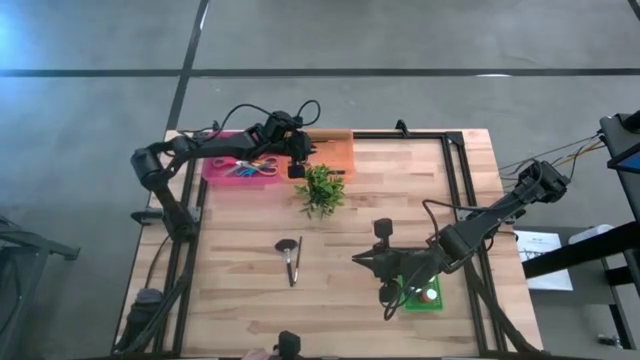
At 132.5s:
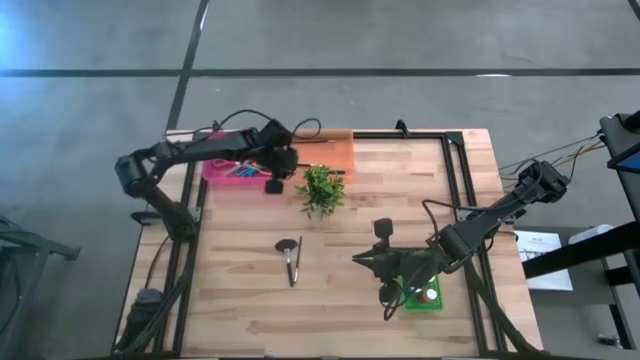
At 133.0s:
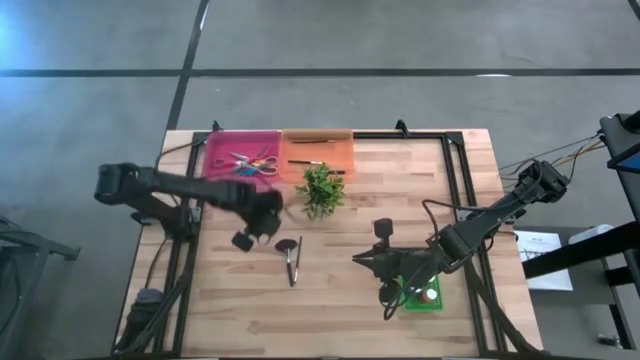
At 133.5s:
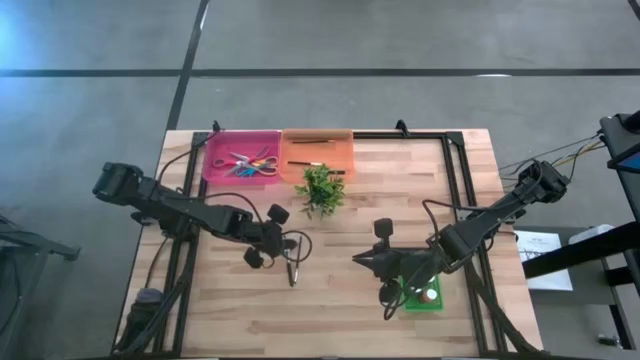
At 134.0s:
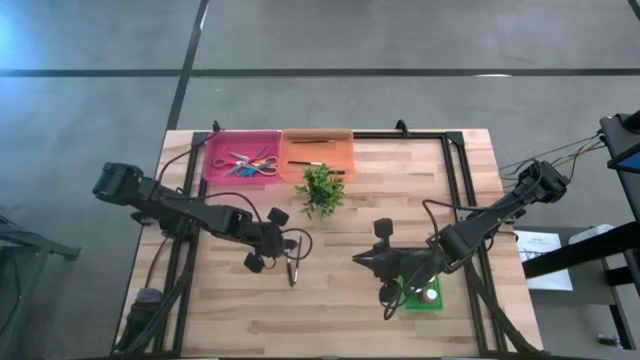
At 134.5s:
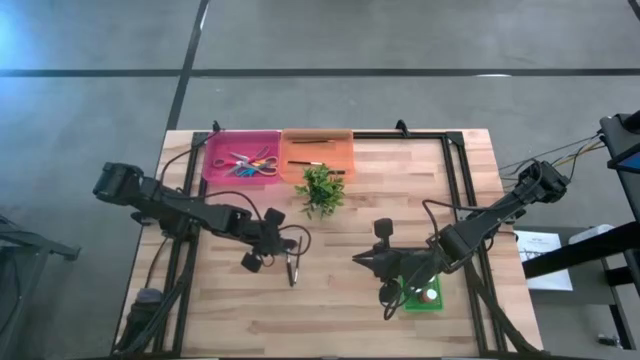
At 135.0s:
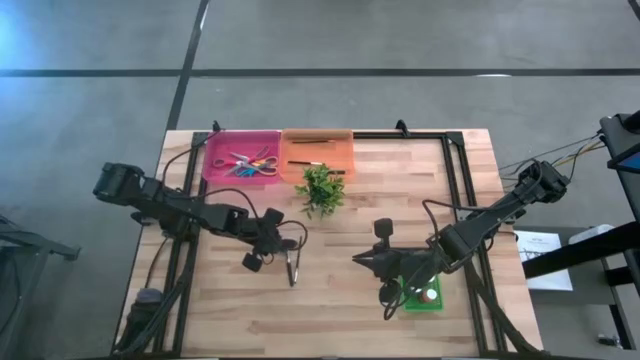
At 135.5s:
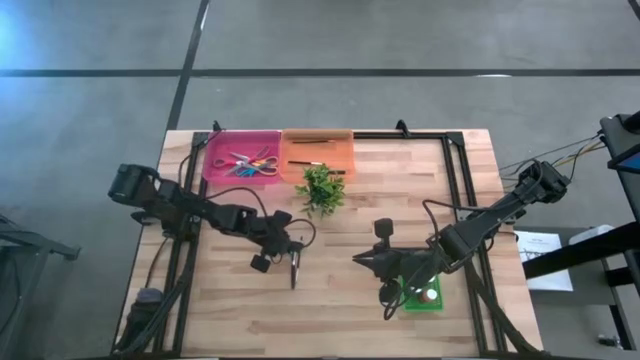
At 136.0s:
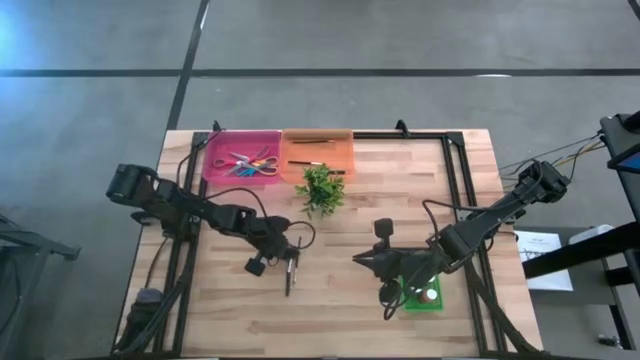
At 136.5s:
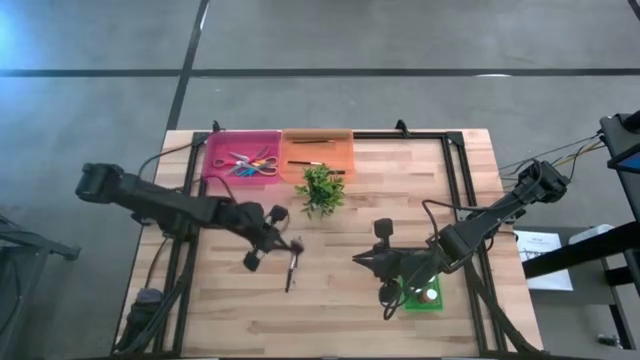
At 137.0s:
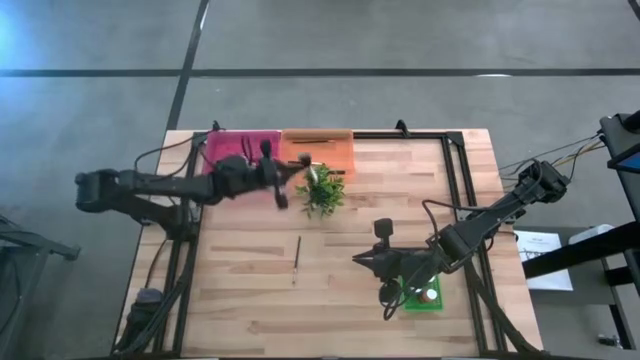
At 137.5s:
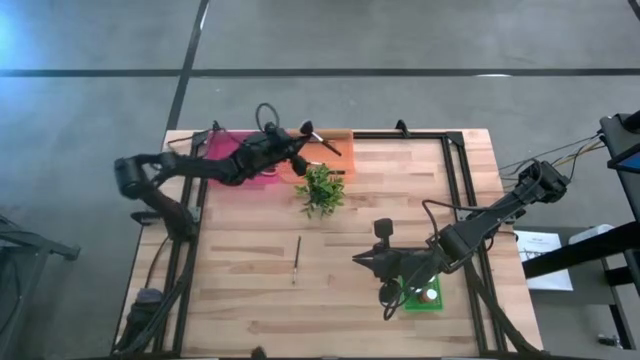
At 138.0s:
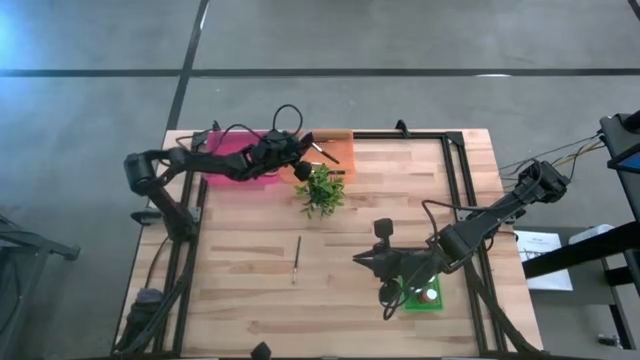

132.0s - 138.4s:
Task: Pick & Place Paint Supplies
Put the silver highlighter brush into the orange bin

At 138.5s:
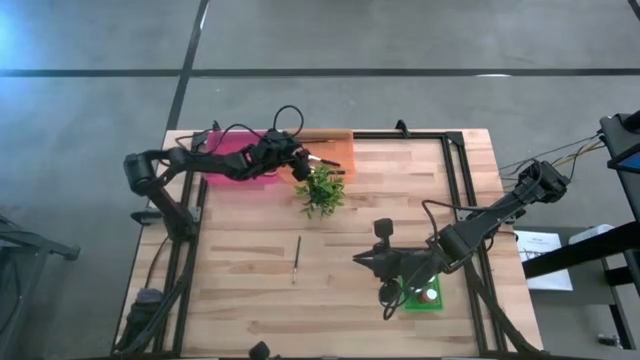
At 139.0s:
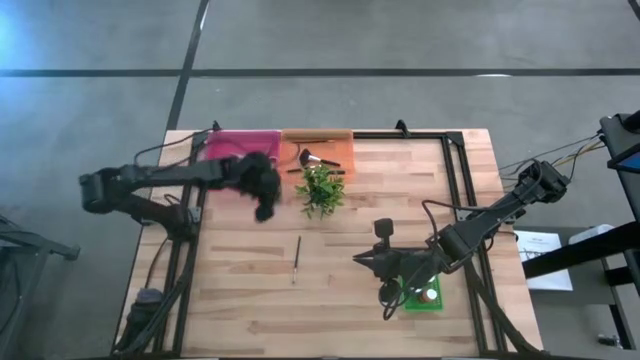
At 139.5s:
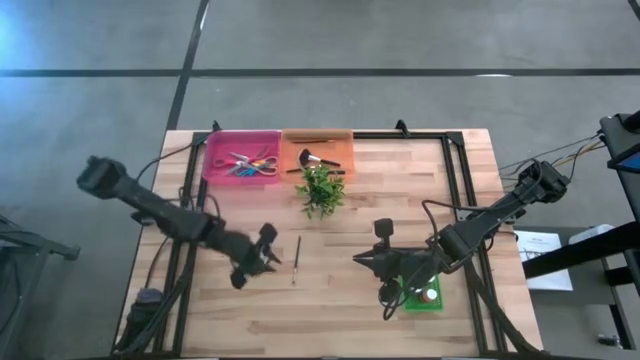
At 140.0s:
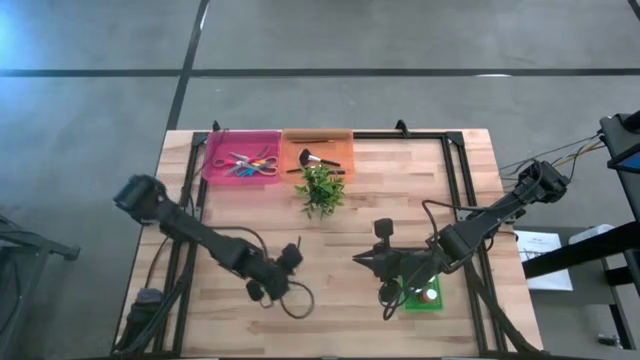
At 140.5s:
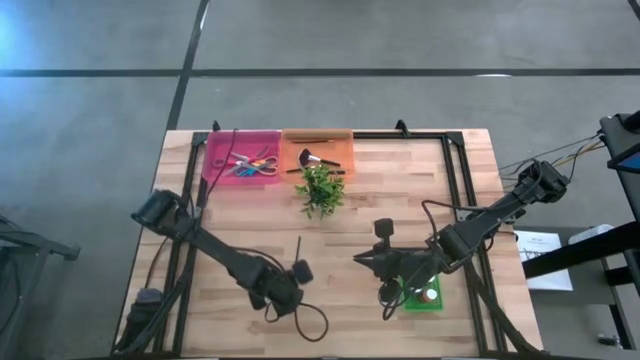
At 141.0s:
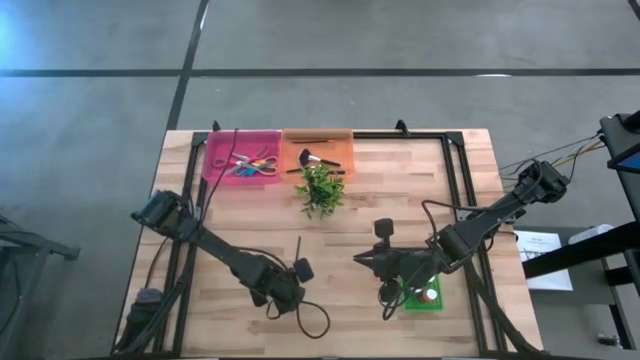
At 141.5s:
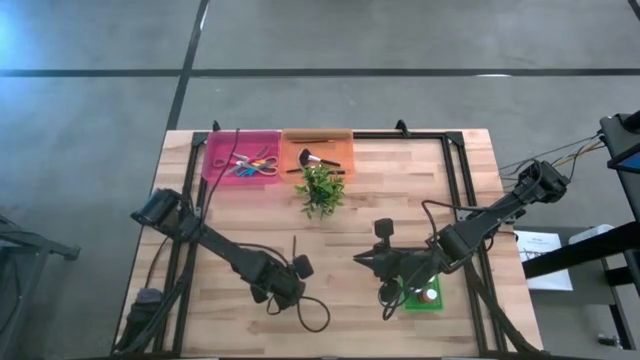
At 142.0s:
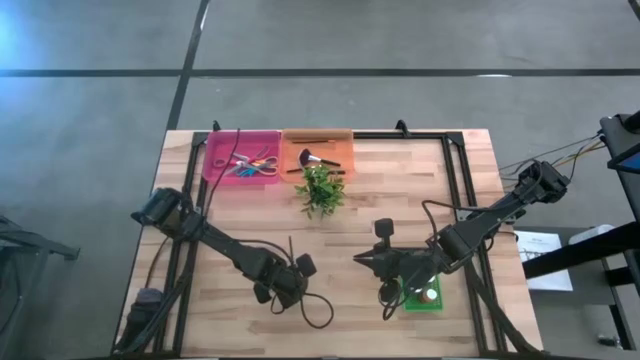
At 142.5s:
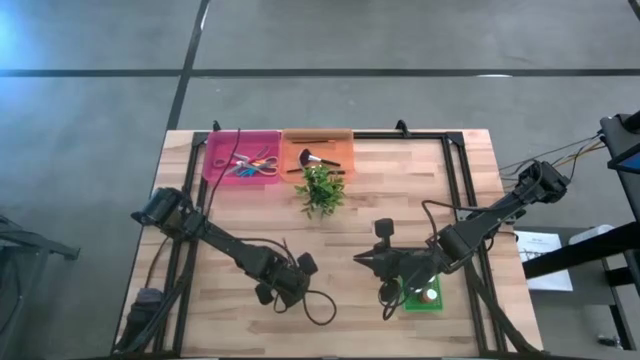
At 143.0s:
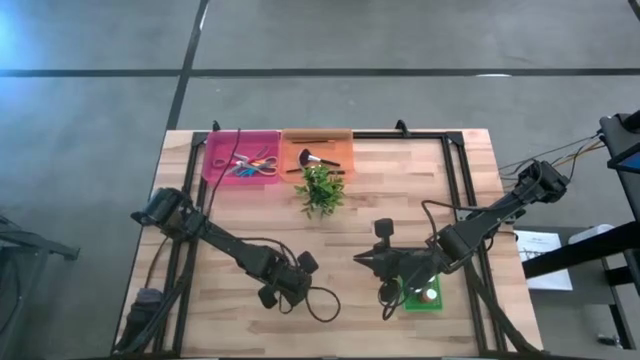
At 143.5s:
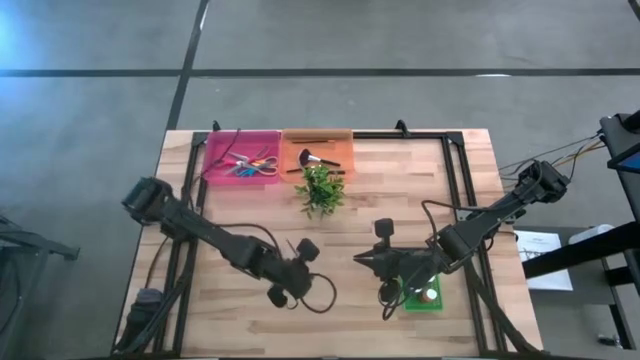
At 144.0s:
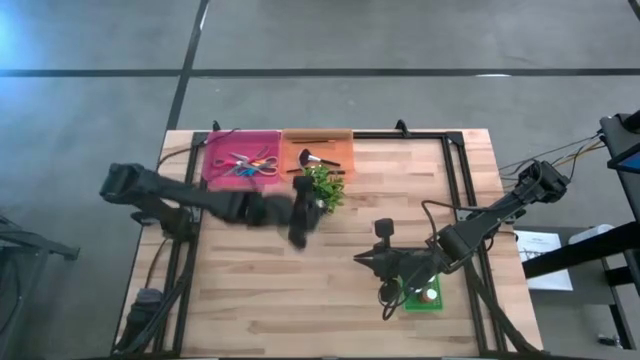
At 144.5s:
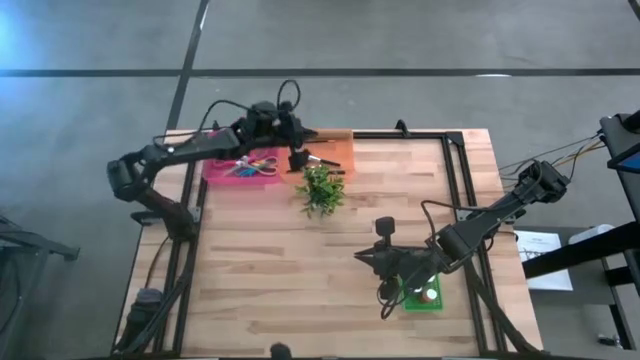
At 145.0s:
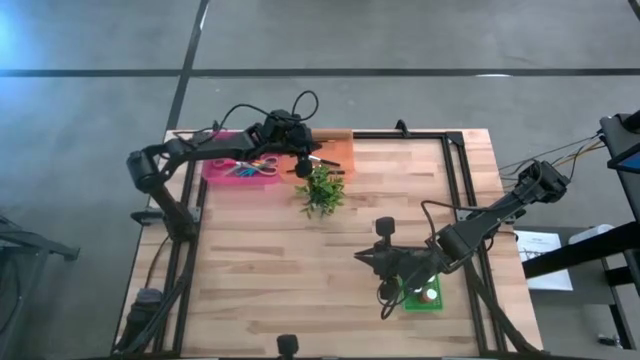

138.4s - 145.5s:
Put the silver eyeshadow brush into the orange bin

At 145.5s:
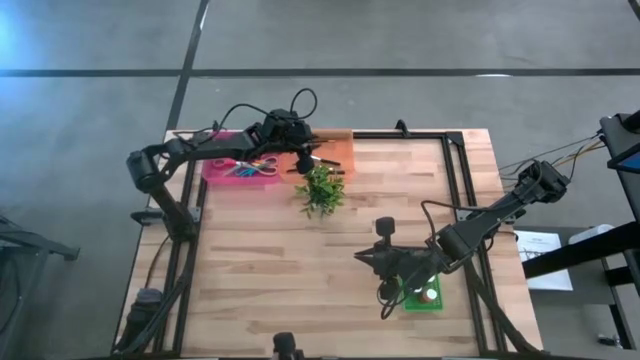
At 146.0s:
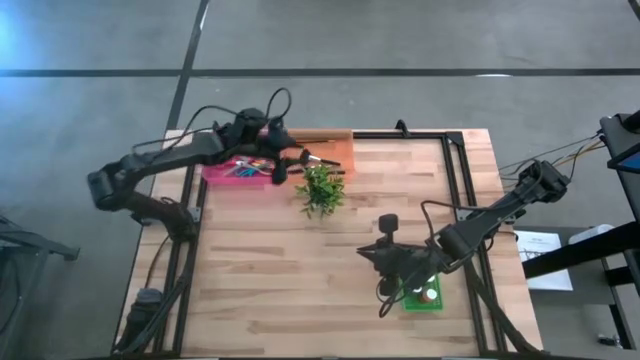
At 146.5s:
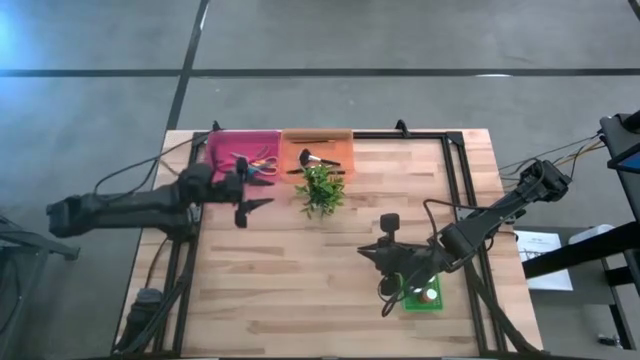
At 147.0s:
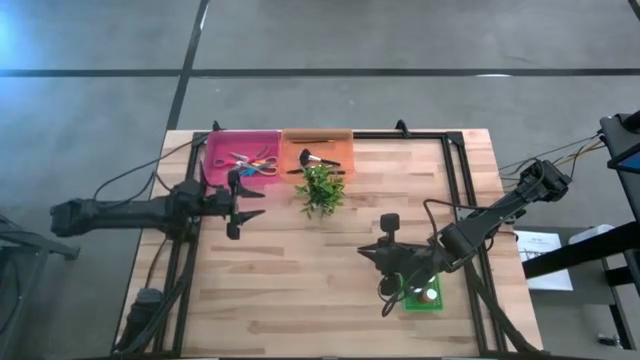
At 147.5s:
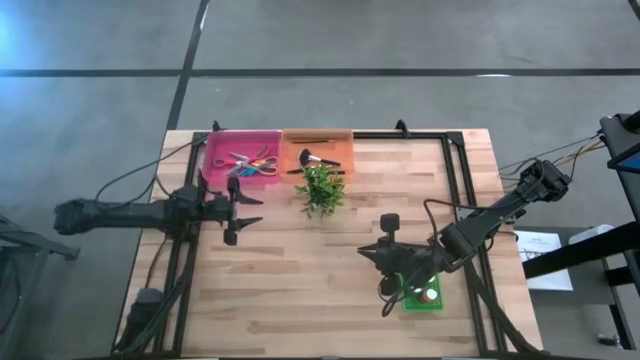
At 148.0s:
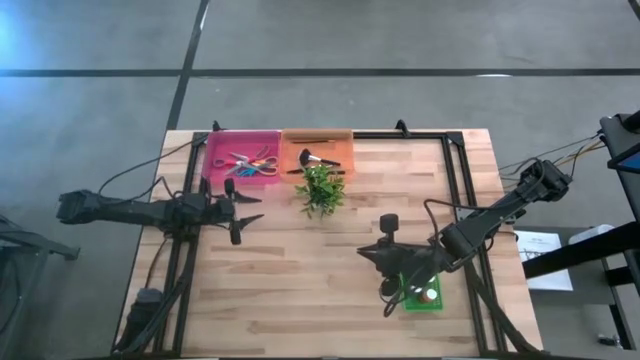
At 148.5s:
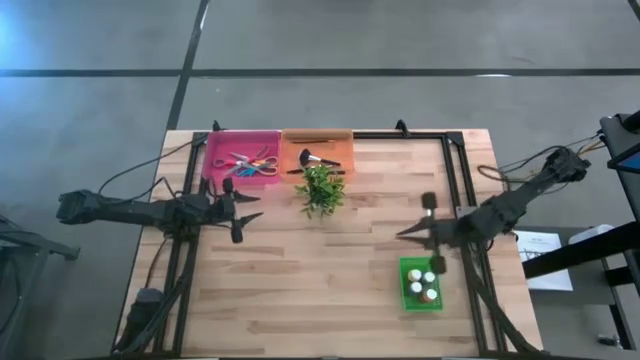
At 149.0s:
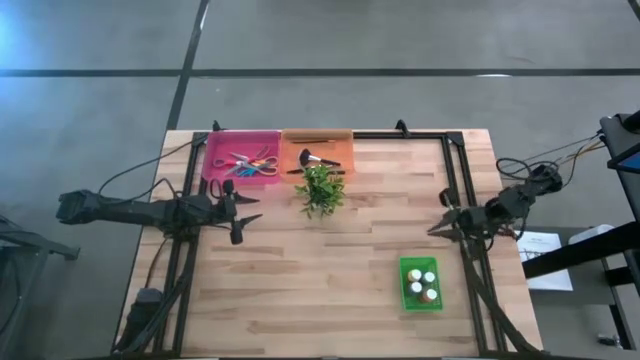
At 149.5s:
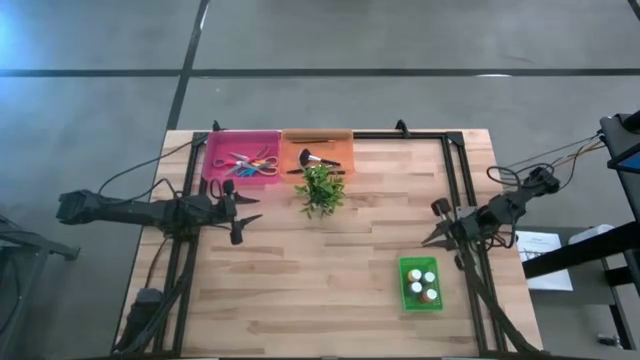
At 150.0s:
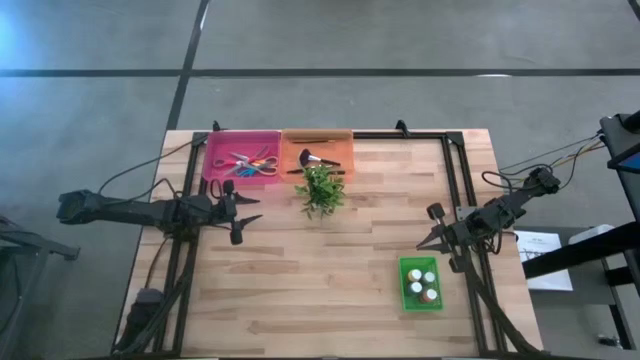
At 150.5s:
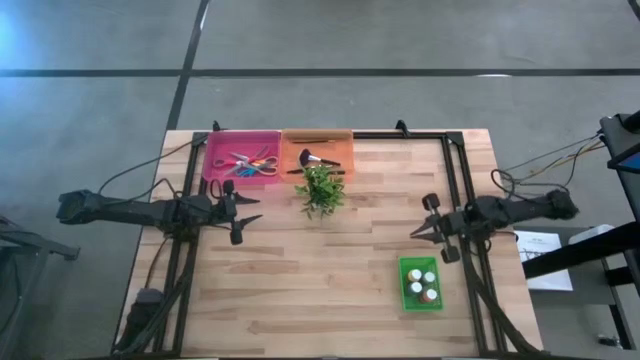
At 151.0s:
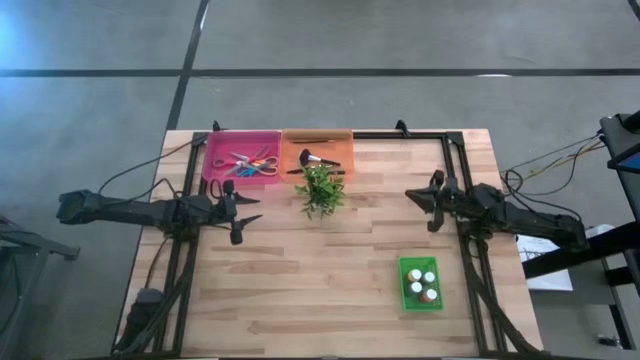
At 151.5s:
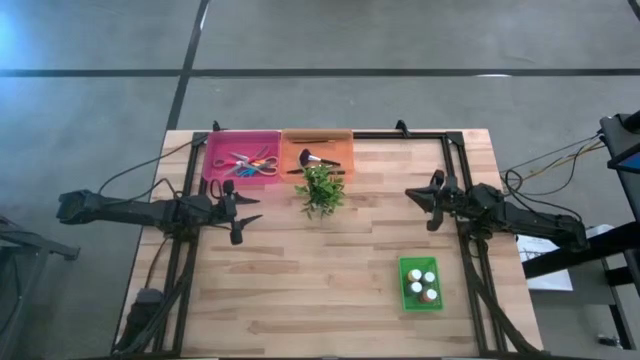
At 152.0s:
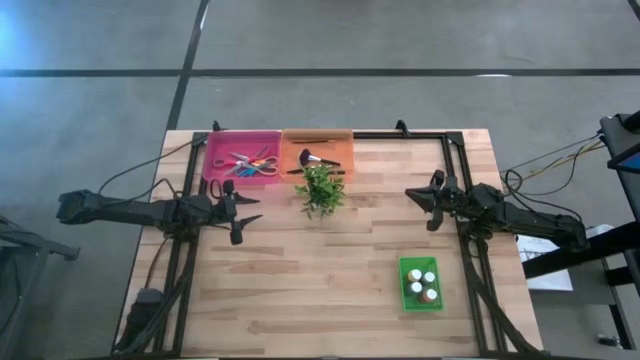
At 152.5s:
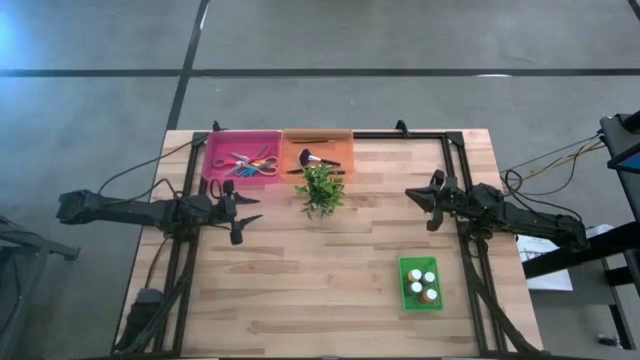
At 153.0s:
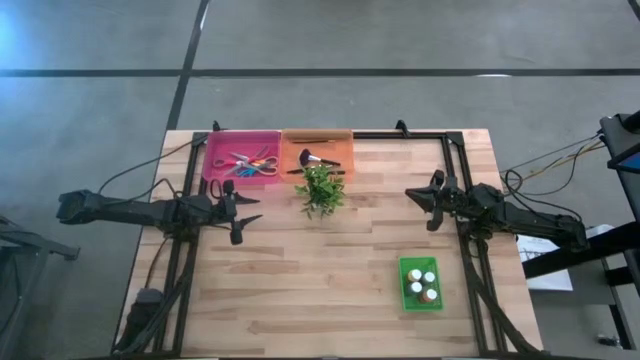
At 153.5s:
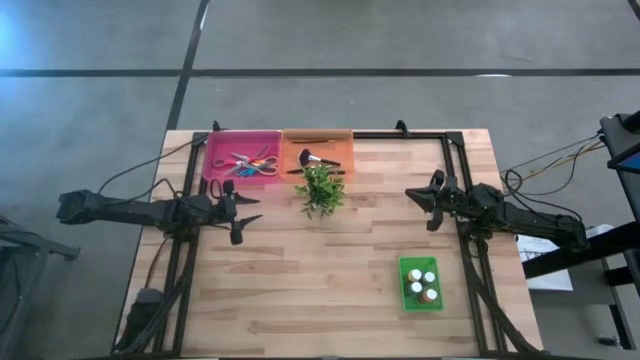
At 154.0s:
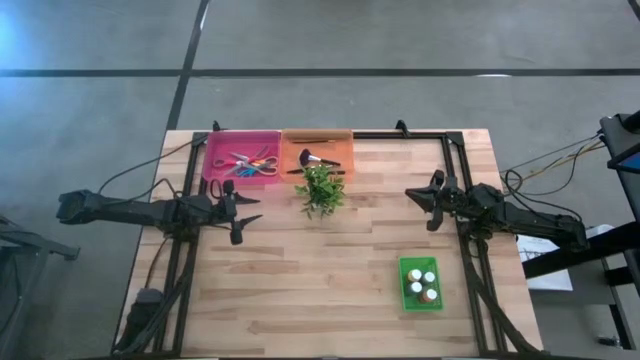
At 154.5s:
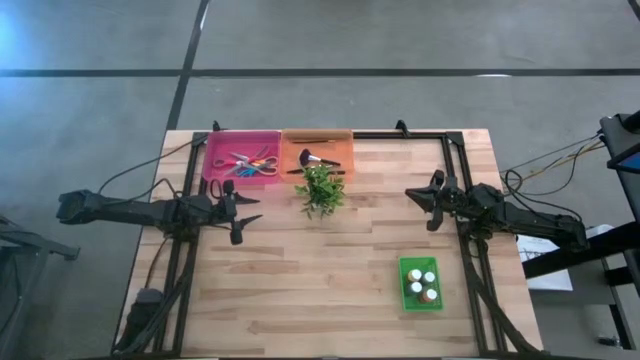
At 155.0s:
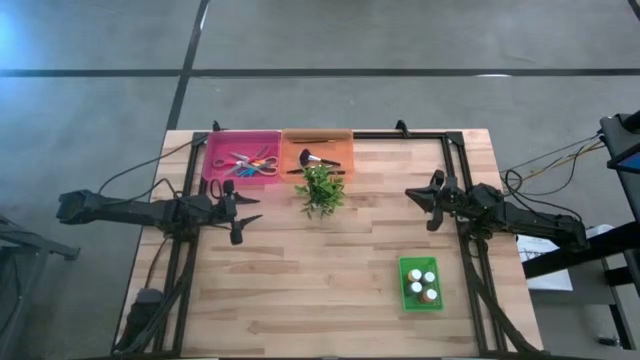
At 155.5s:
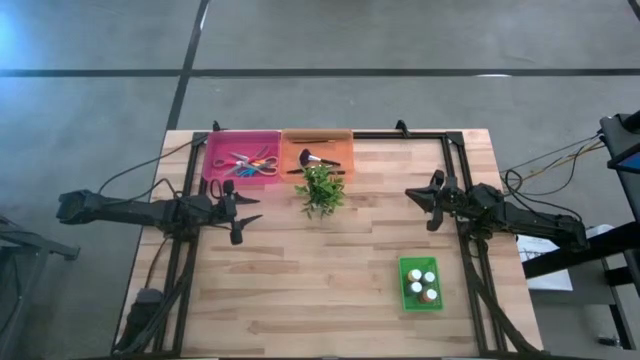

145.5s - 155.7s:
Return to Home Position
